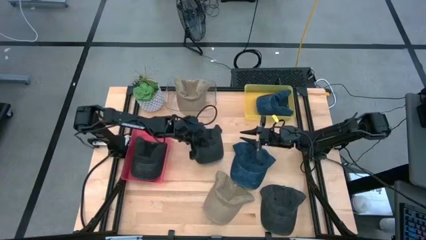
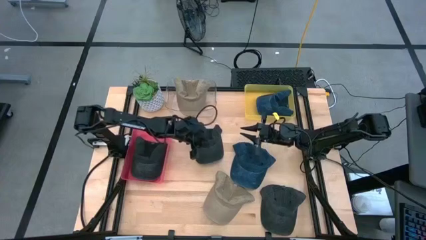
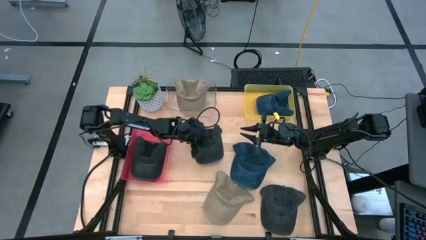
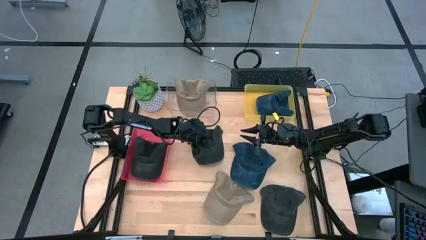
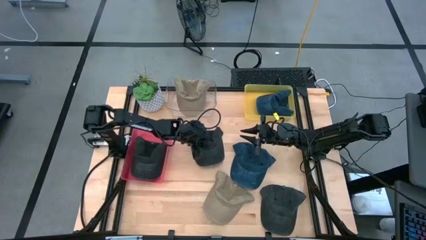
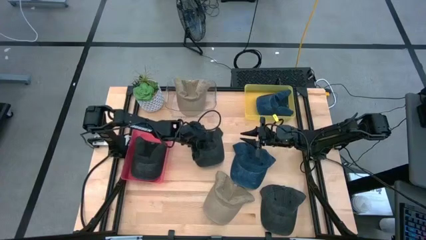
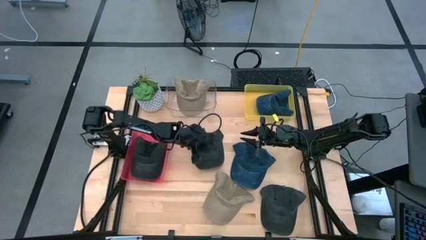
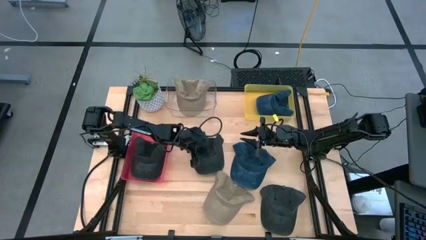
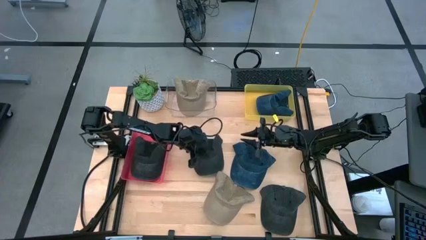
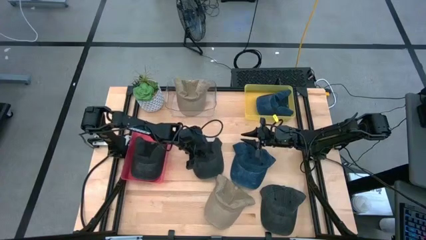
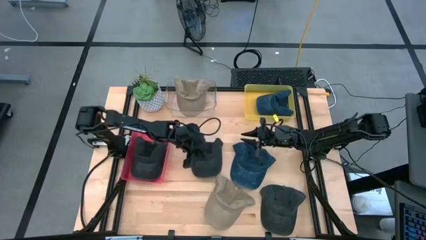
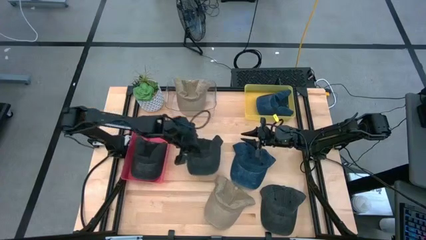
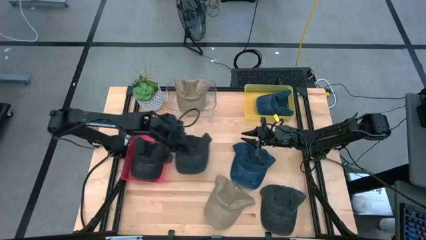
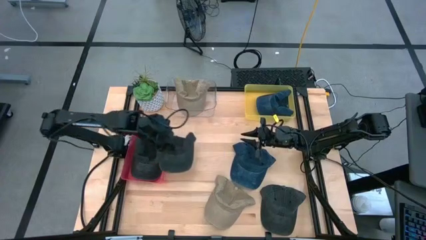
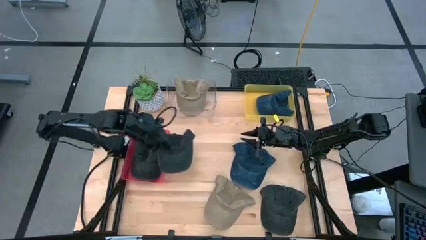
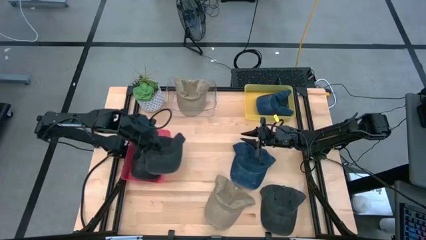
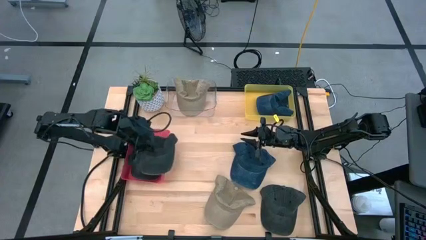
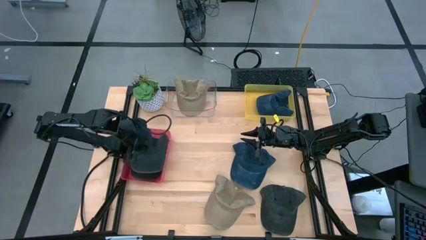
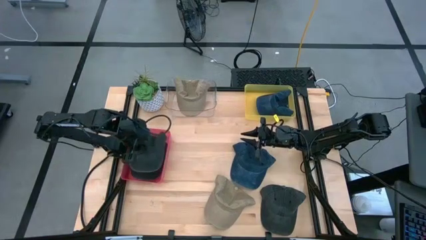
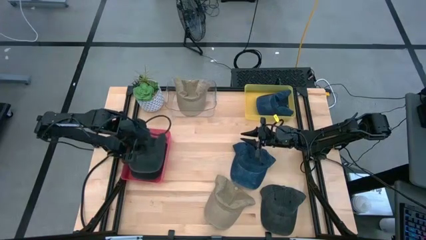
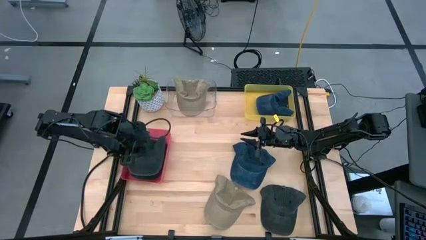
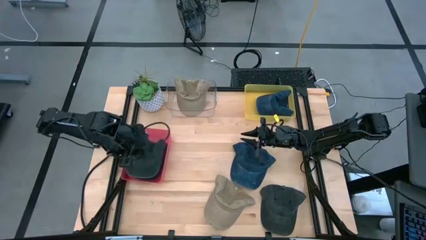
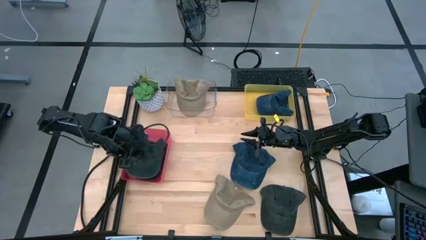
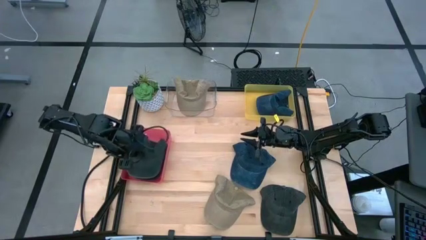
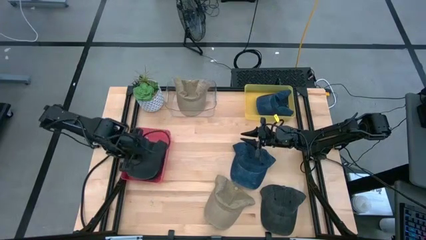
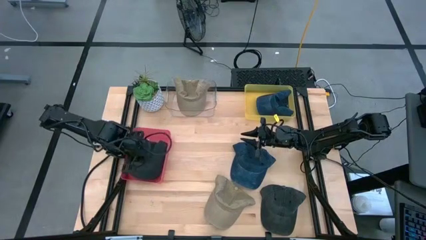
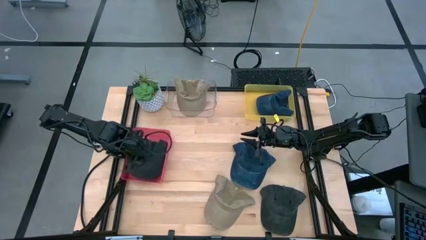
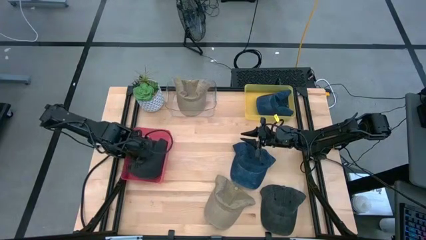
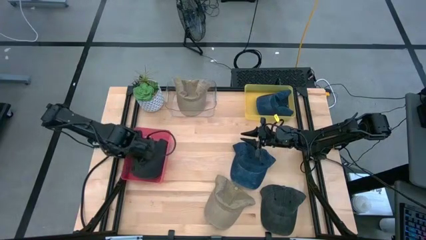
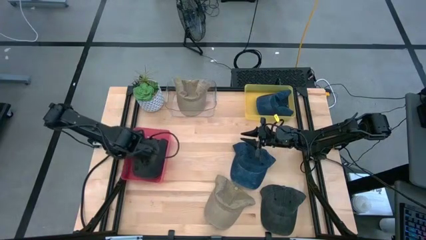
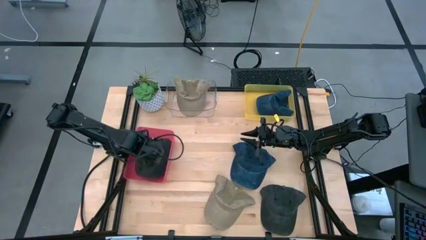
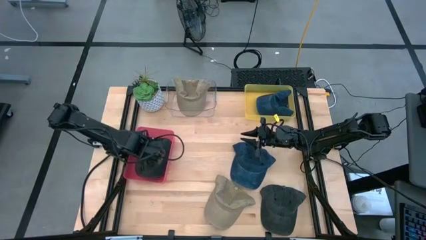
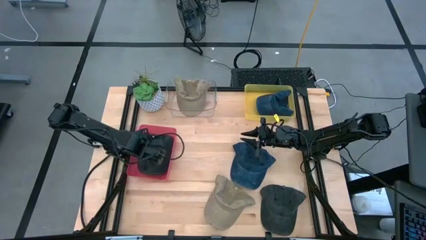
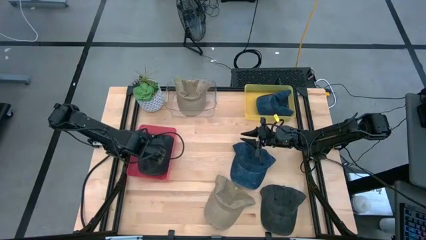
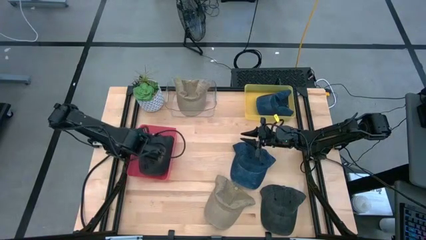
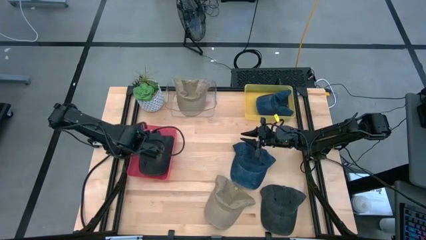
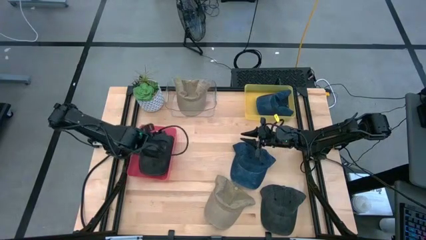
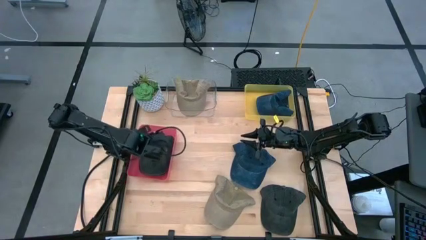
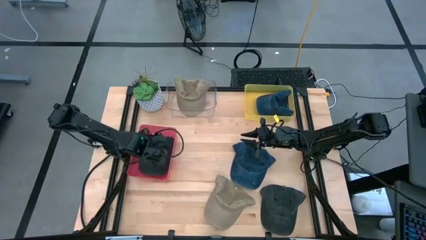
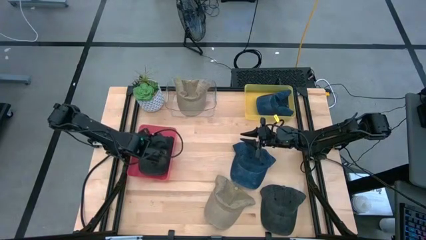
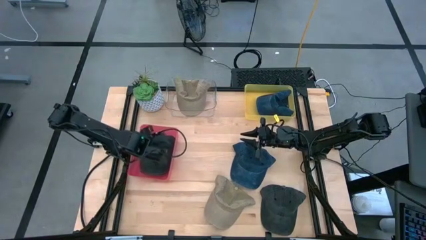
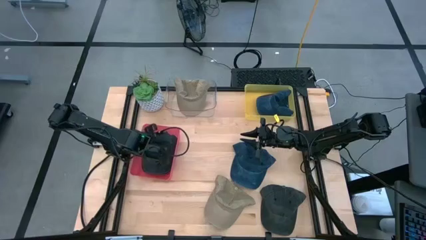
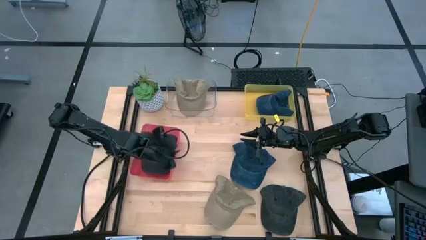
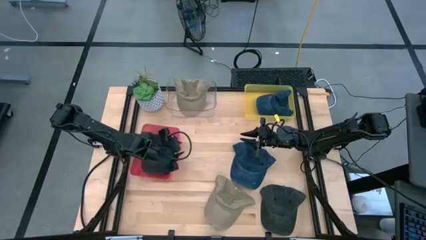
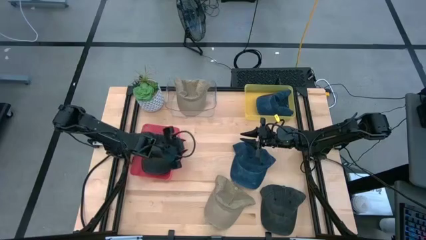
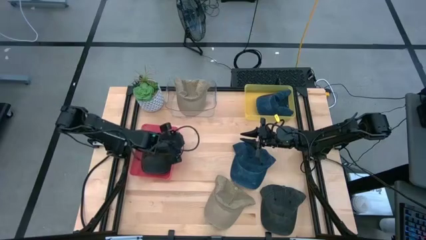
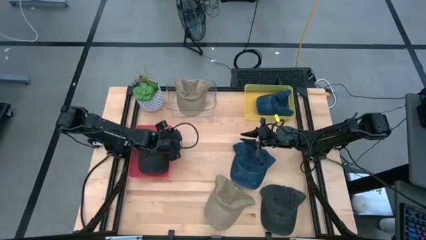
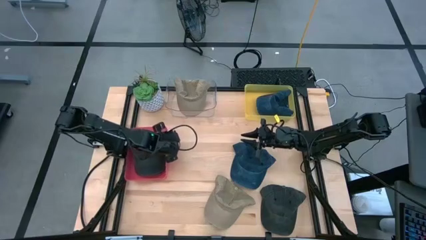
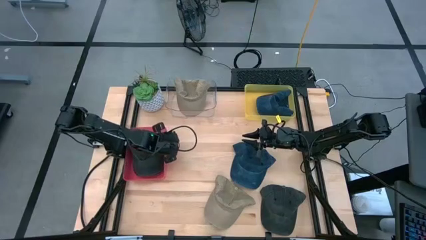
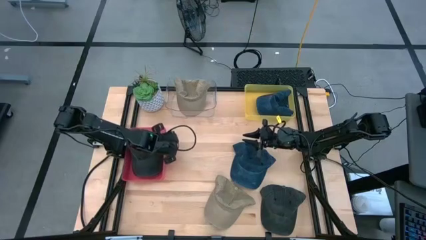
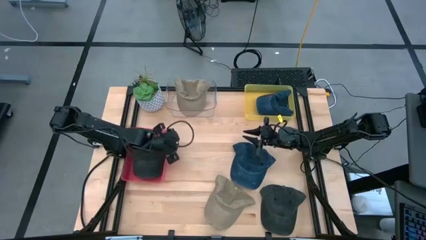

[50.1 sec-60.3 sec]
Task: Pick & Place hat
Put the top black cap into the red bin

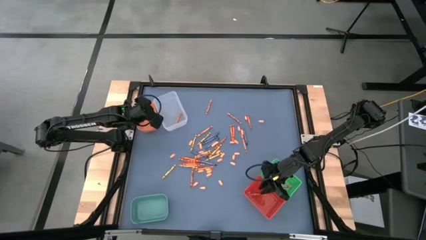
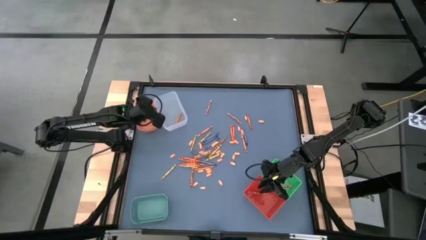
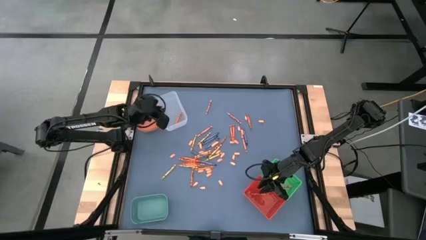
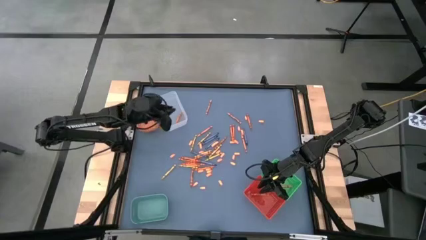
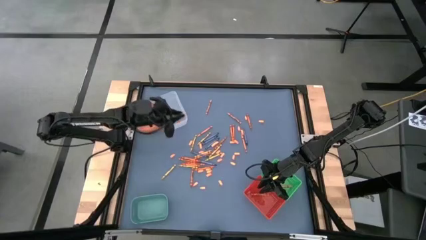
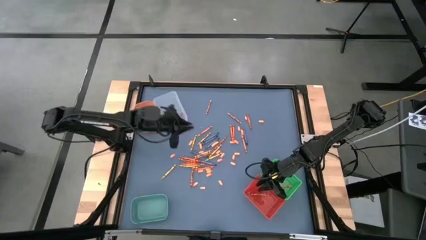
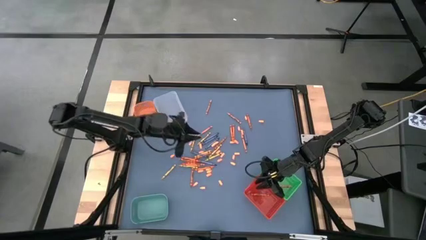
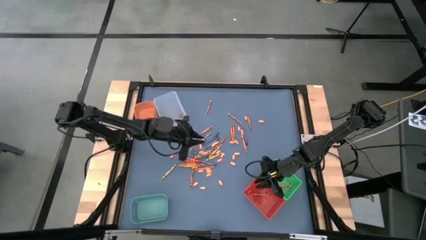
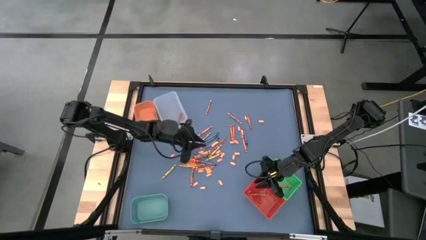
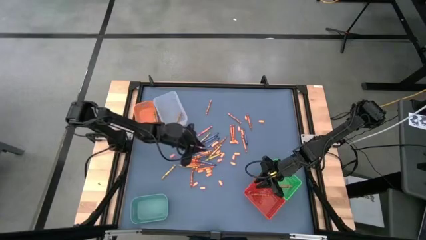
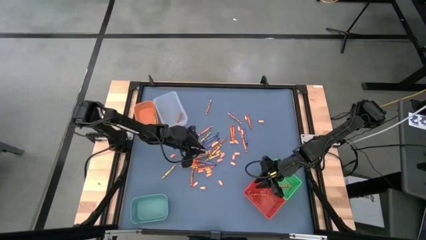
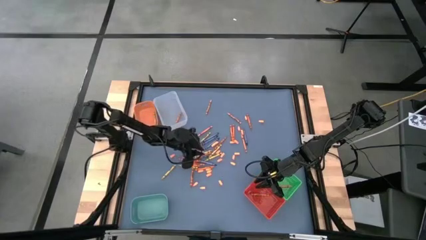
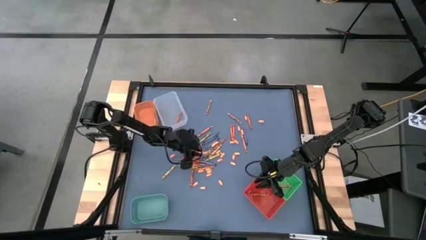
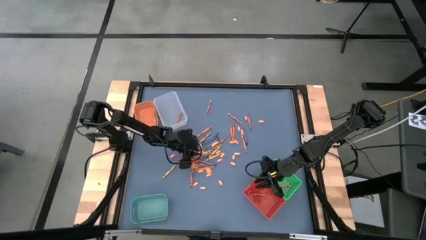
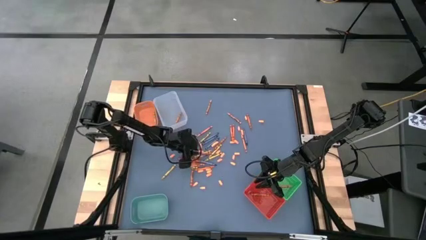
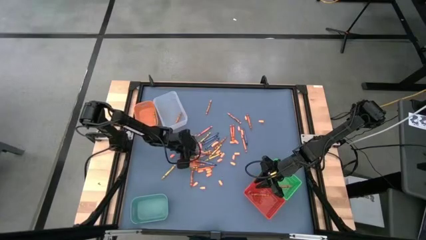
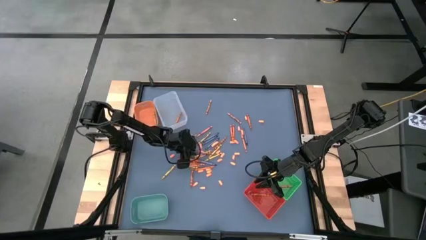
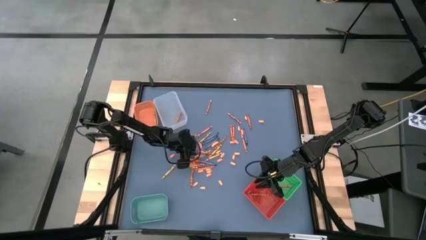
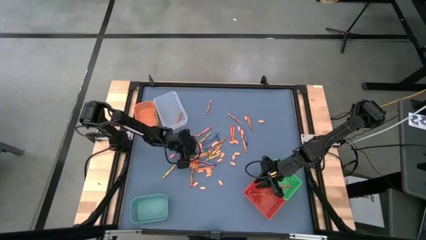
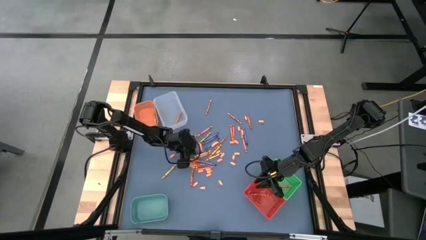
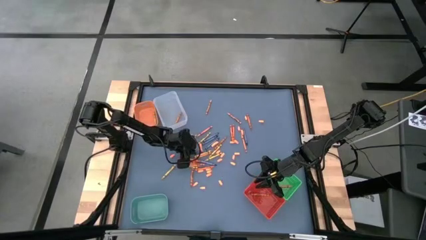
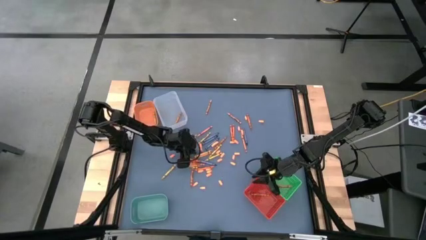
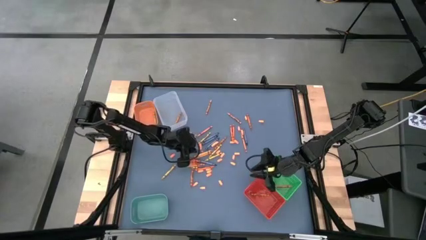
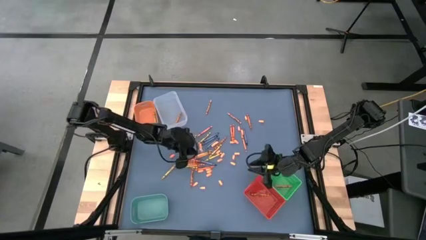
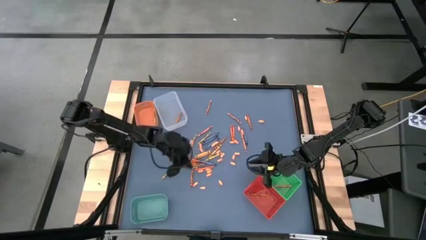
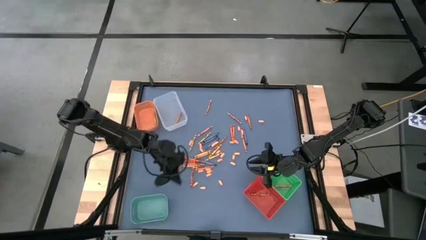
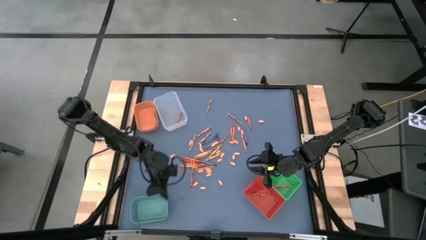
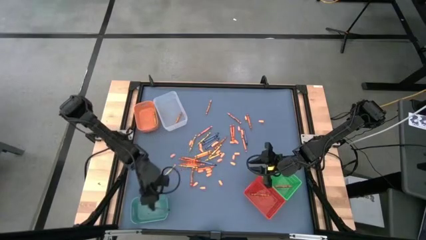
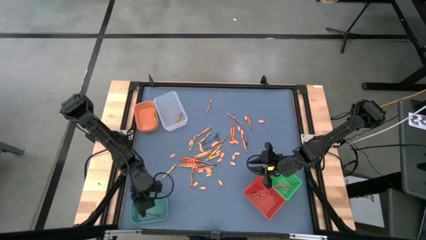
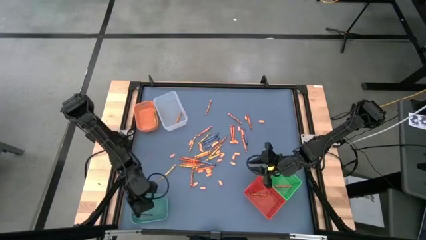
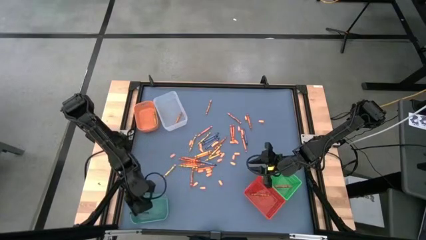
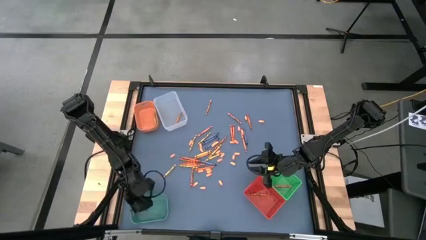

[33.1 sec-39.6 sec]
Task: Sort crayons
Put the blue crayon into the blue bin
